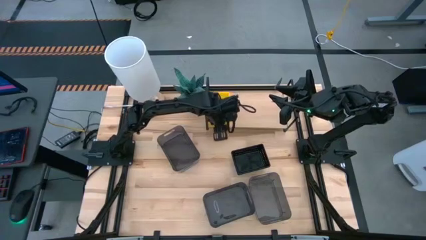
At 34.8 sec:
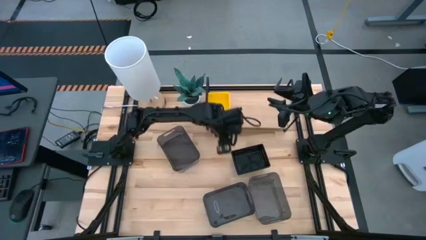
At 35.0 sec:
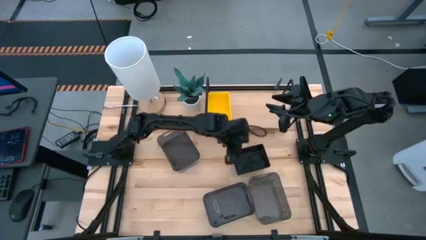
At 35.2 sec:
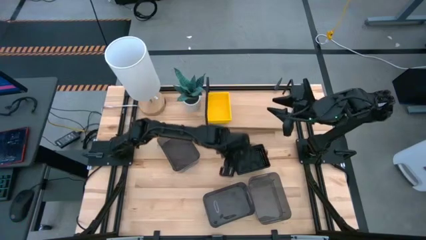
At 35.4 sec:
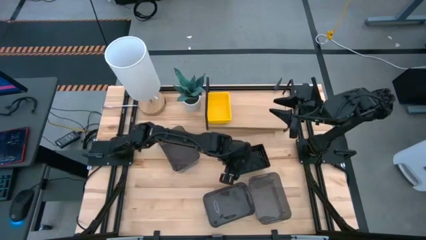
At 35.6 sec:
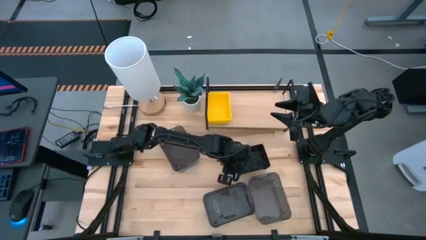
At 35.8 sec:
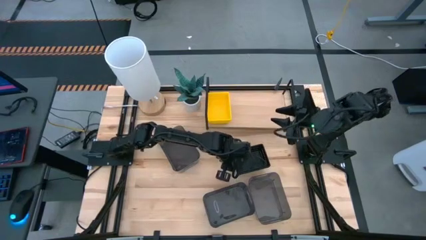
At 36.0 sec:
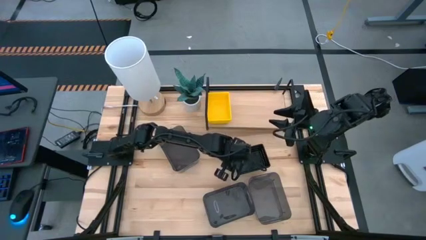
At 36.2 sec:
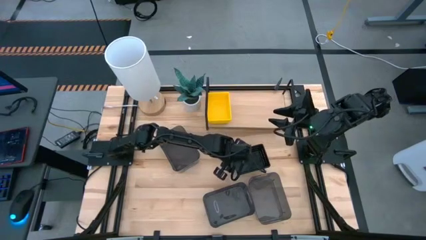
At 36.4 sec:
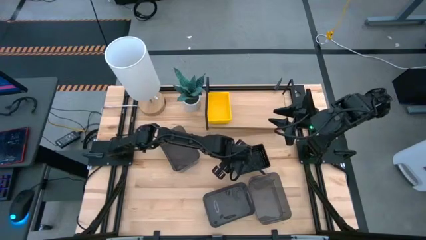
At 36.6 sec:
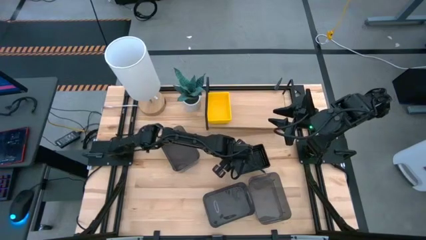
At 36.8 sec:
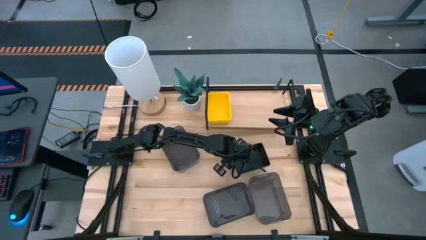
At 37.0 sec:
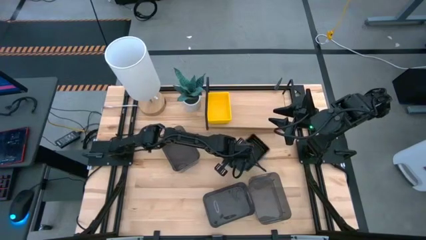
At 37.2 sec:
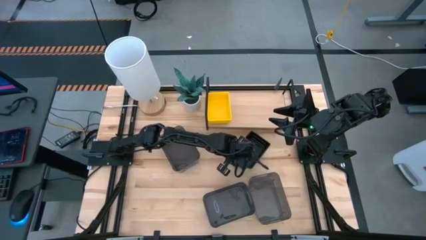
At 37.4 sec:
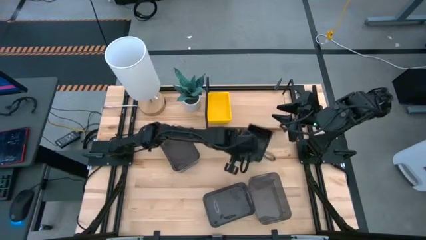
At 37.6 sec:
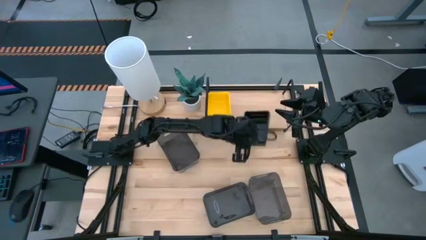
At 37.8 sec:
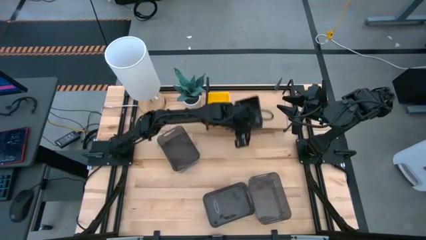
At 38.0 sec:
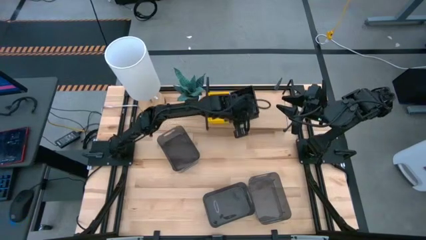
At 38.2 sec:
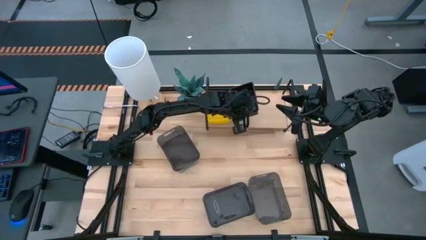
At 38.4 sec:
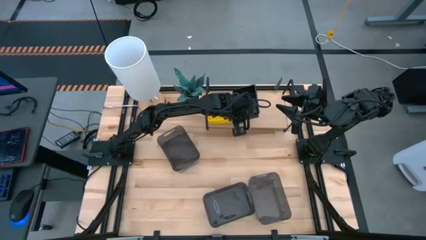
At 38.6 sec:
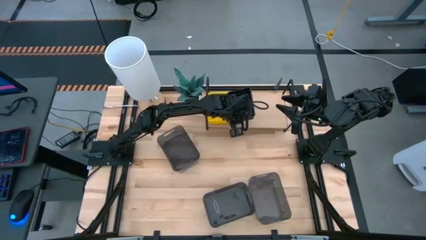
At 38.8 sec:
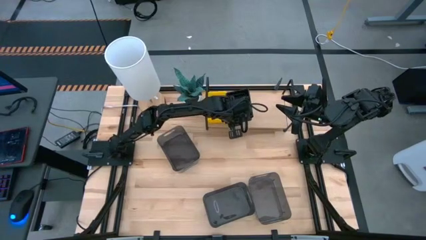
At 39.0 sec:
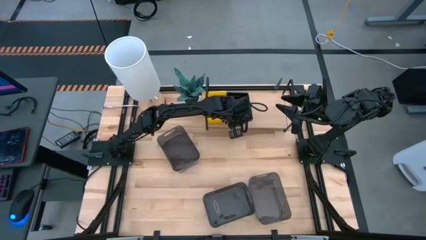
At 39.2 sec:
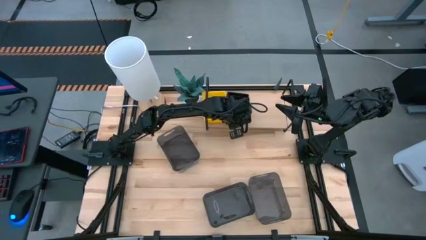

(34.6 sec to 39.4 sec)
Task: Stack baskets on shelf by color
Put the stacked black bins on the shelf

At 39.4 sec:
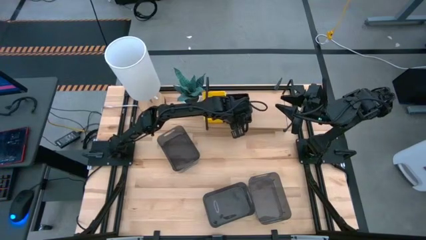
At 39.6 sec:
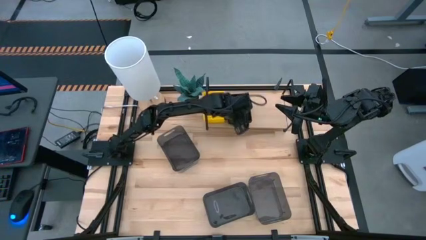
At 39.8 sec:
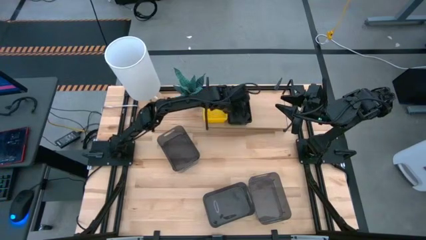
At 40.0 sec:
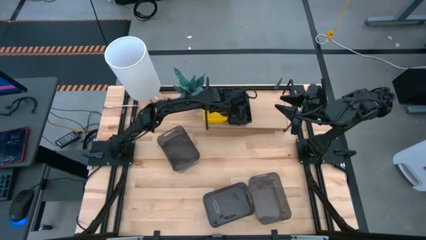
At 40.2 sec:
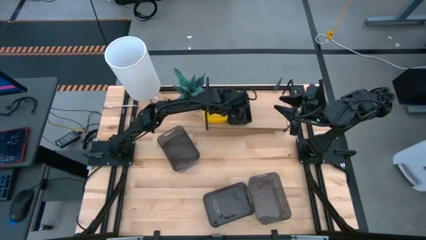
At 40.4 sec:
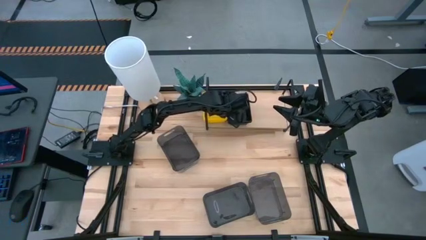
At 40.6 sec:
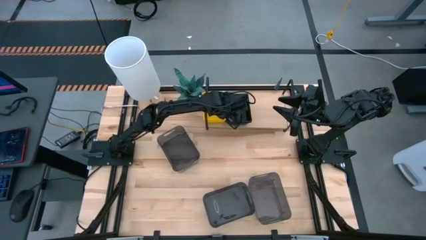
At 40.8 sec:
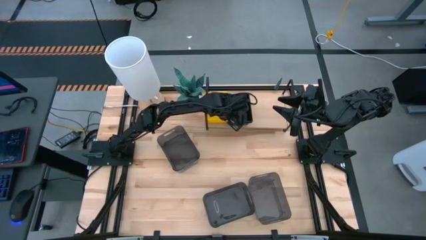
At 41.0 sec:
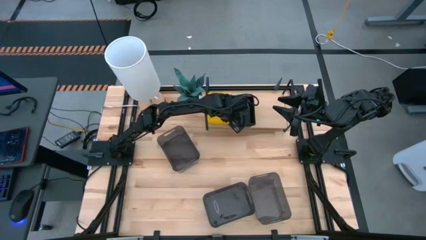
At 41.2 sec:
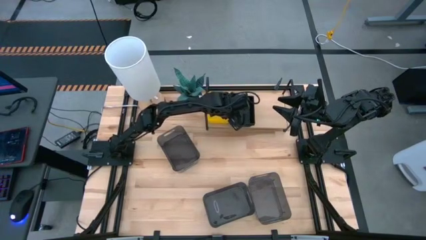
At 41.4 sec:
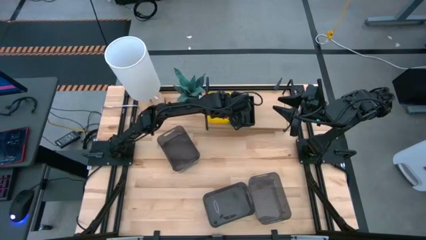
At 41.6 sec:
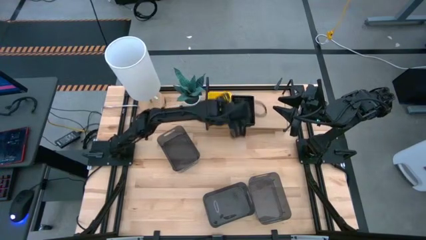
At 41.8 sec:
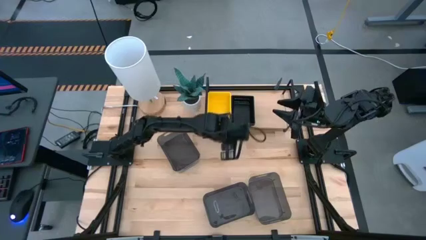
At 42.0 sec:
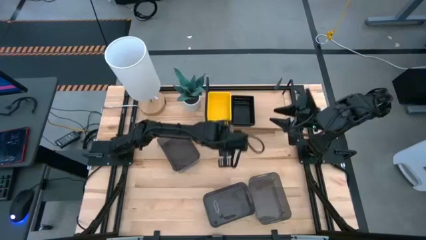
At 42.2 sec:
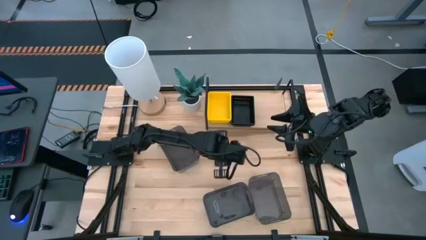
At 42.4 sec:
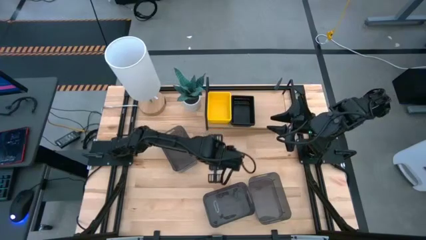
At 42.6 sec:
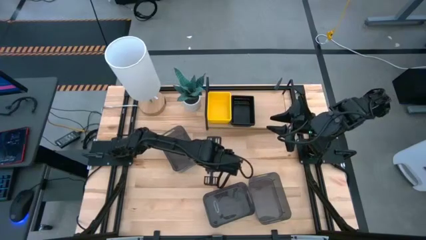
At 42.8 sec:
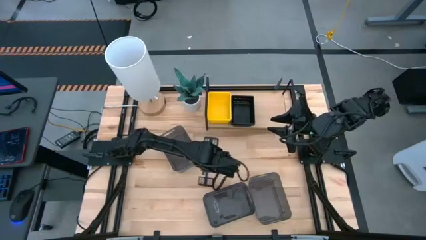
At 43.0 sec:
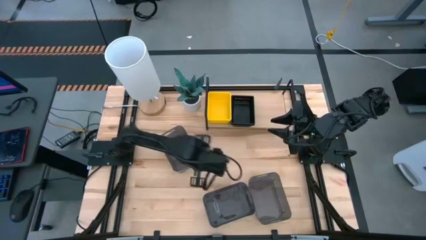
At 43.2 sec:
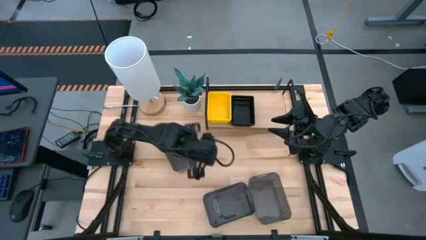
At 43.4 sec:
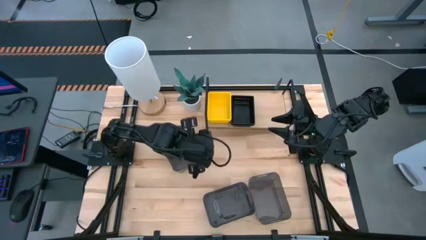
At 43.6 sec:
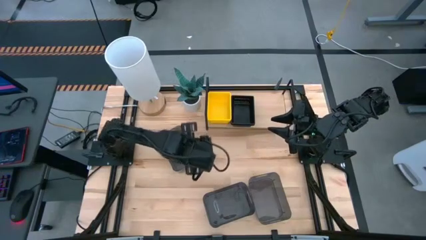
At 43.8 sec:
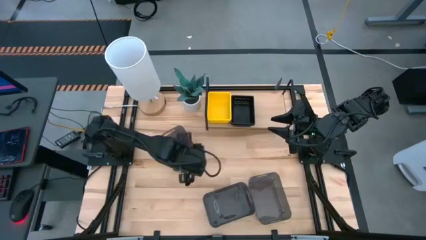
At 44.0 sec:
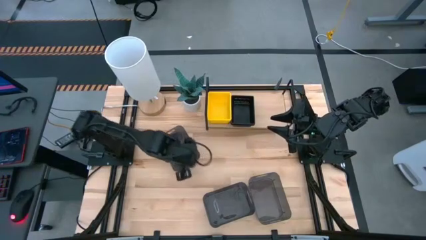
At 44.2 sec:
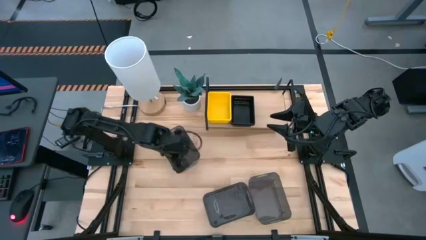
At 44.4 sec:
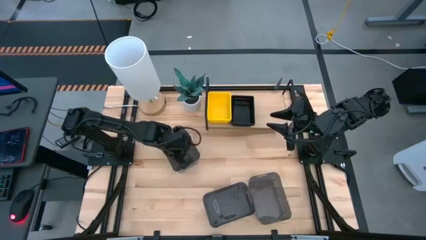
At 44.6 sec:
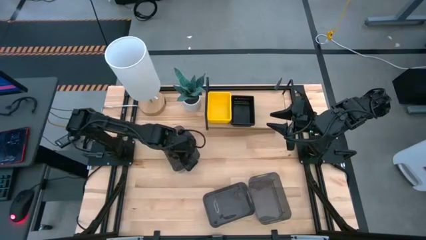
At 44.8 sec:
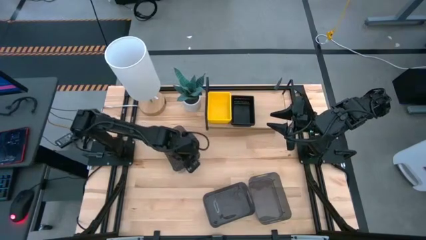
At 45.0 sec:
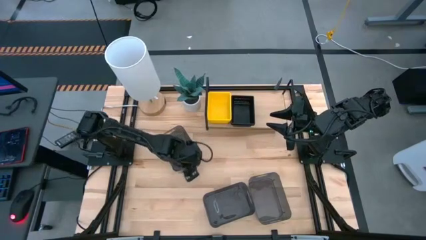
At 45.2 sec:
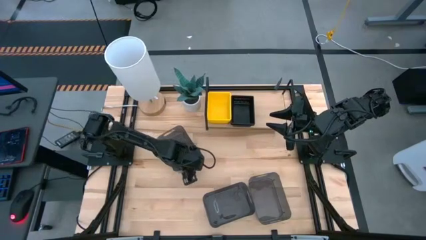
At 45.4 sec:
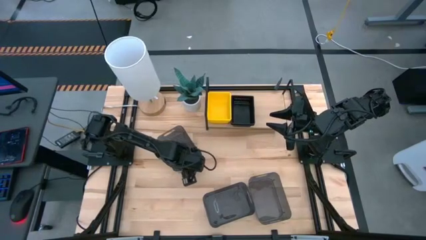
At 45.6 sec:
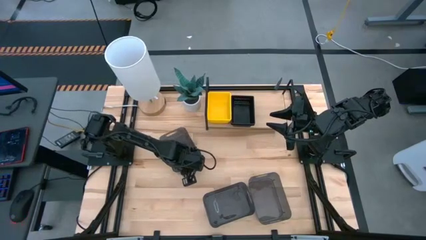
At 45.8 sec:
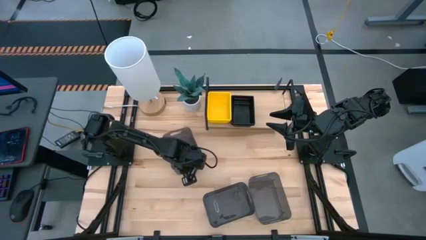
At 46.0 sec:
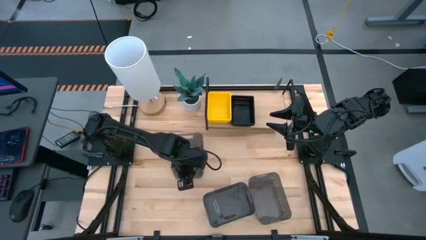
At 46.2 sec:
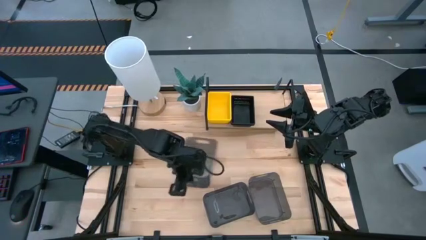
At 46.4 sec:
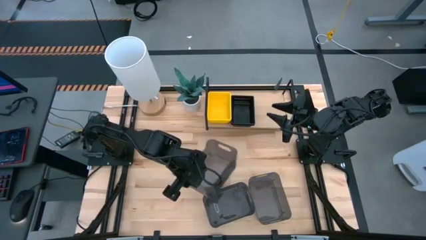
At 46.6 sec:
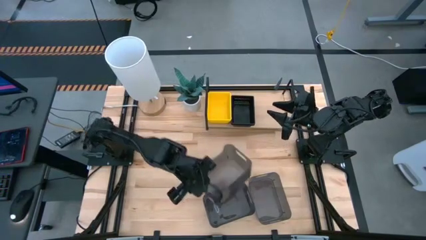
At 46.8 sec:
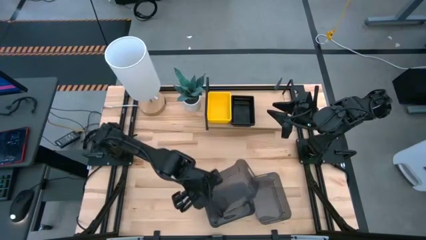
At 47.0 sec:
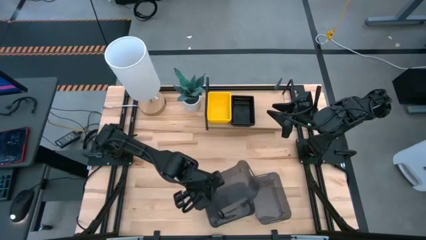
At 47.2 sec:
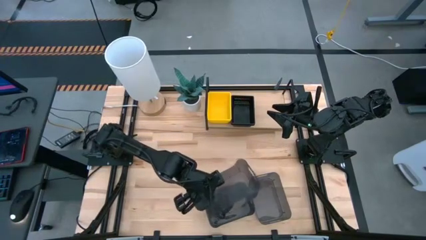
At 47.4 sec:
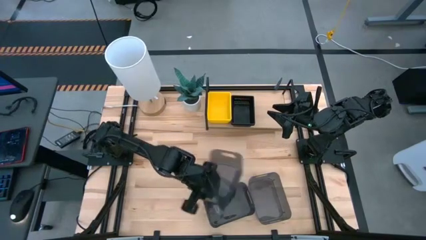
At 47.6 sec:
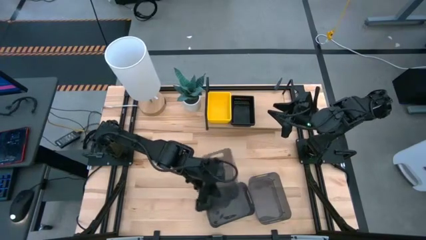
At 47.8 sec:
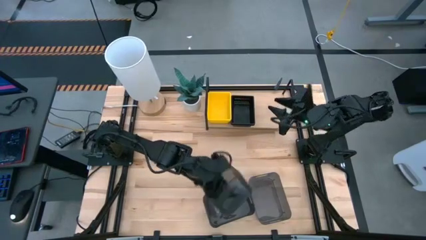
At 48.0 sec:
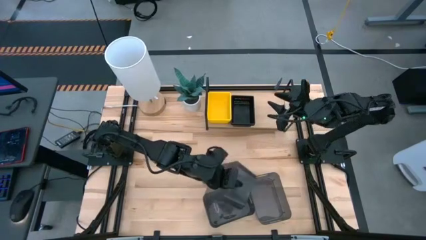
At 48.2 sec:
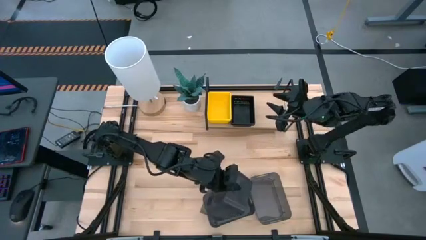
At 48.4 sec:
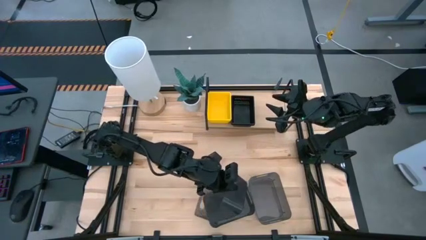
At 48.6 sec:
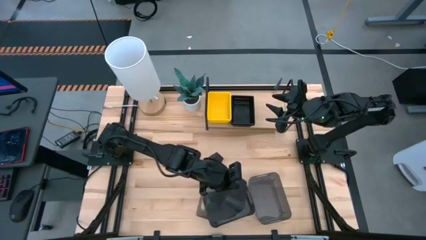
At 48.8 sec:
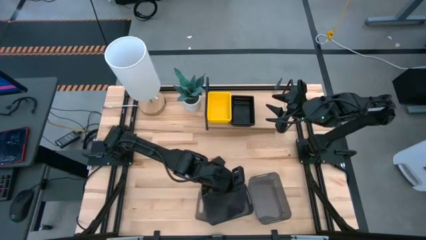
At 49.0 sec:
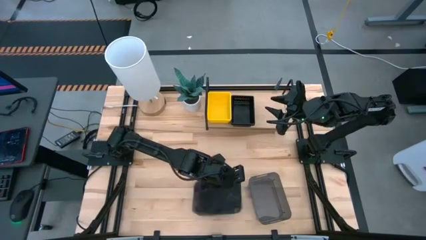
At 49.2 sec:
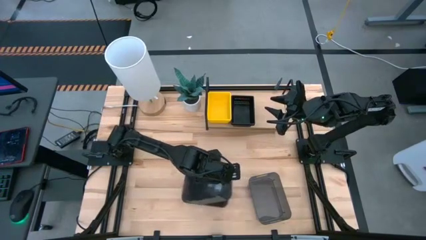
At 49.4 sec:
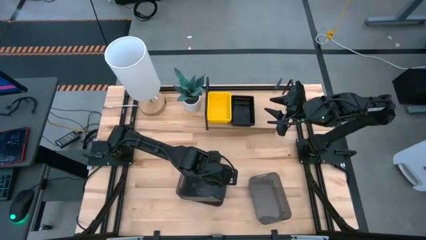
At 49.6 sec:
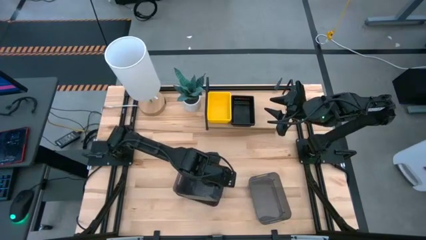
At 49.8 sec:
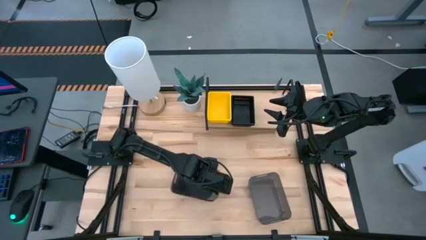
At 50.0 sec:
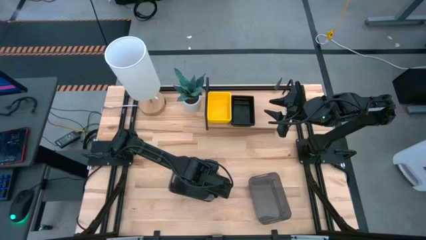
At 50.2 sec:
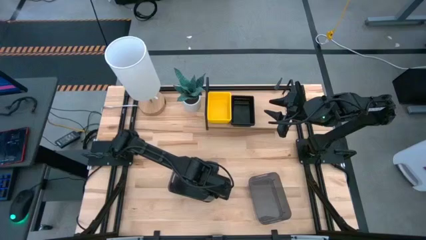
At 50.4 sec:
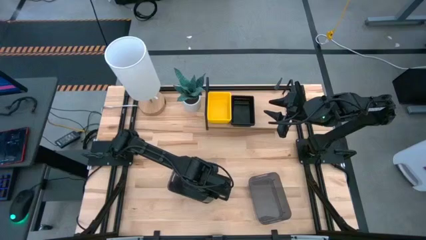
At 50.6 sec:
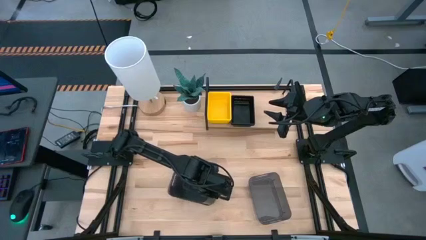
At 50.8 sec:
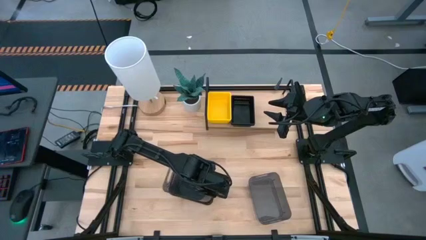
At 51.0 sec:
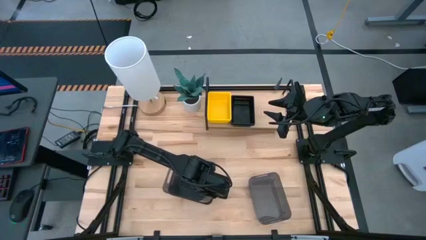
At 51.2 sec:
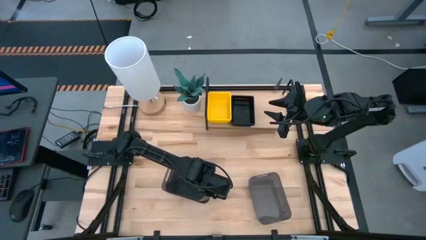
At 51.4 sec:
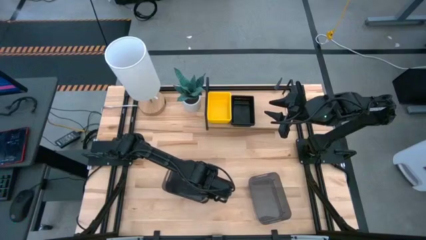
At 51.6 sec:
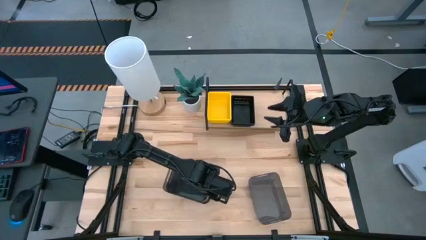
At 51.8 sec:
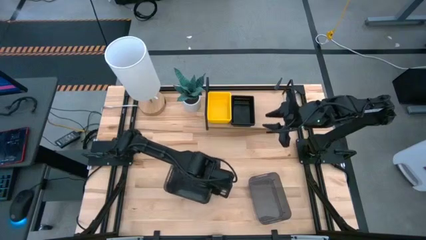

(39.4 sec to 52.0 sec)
Stack the top left gray bin on the bottom center gray bin
